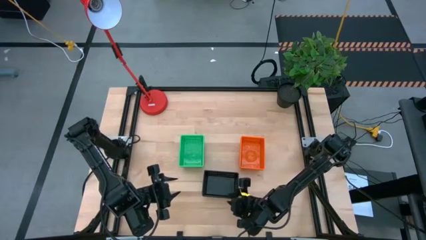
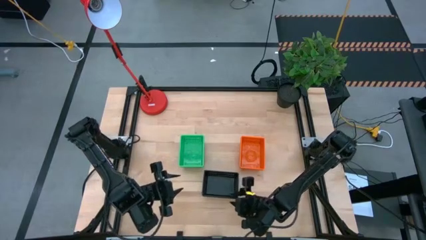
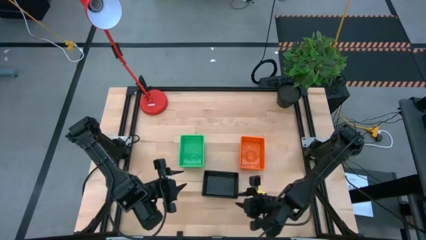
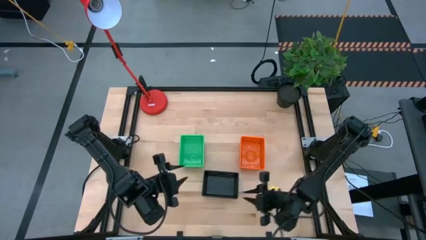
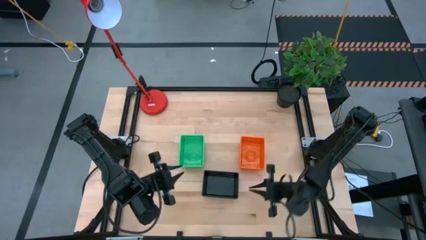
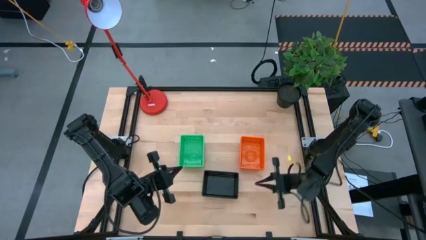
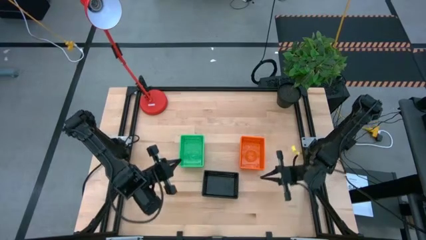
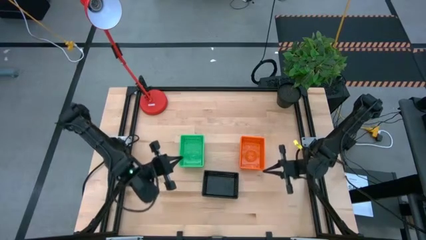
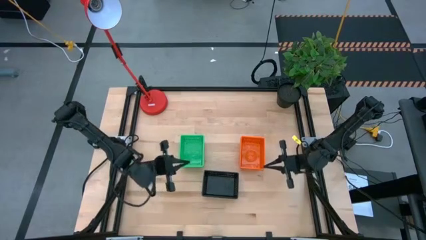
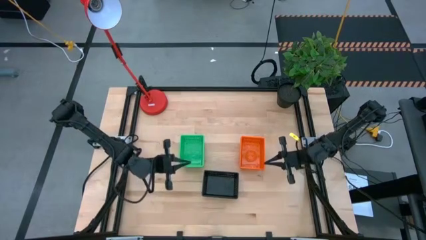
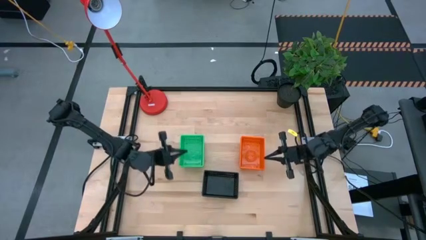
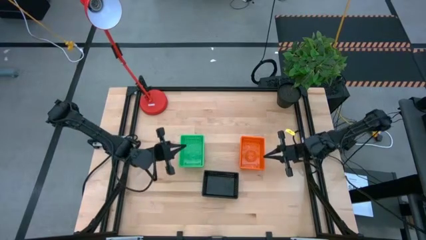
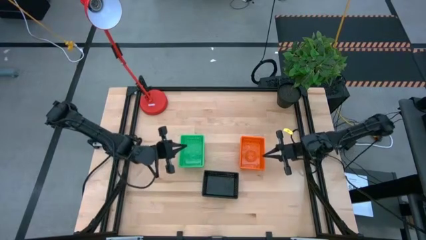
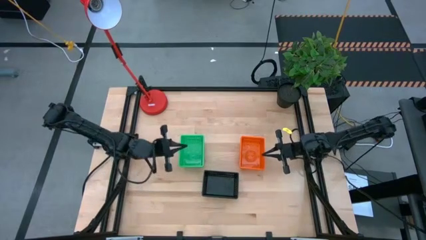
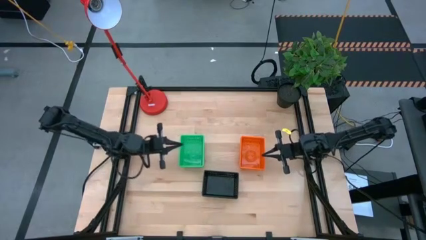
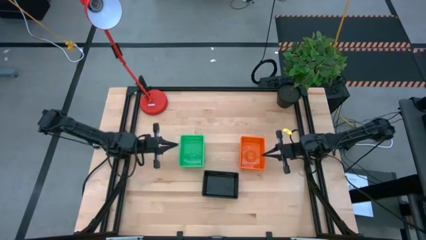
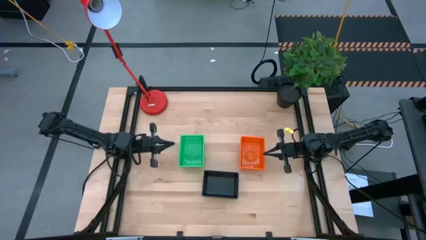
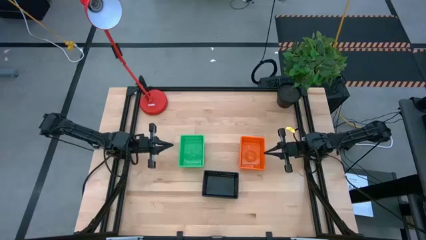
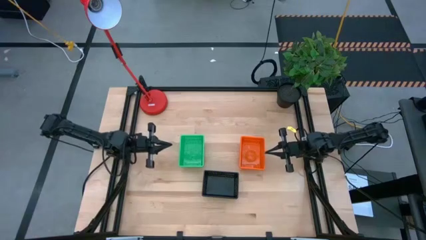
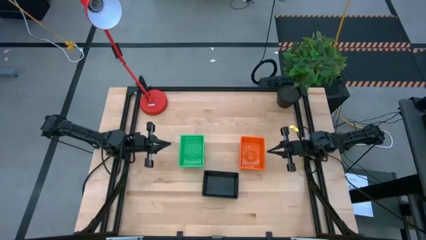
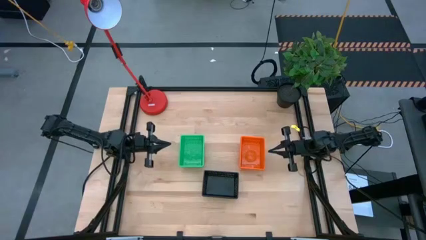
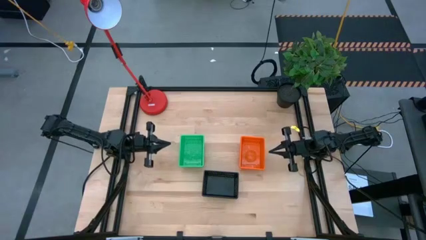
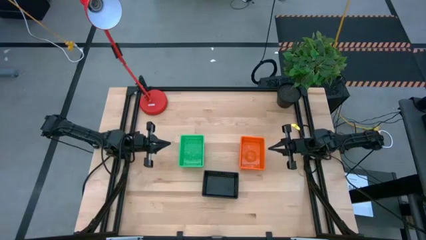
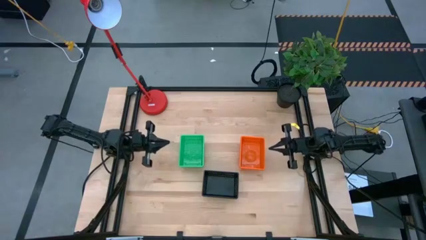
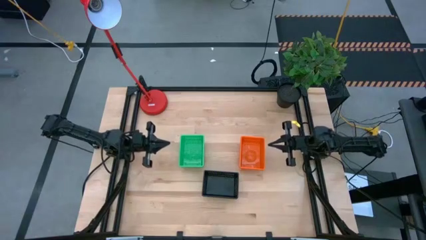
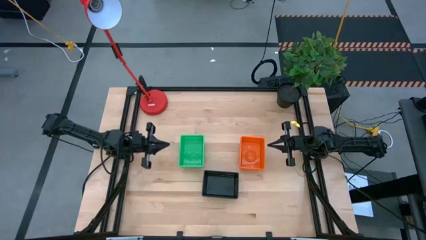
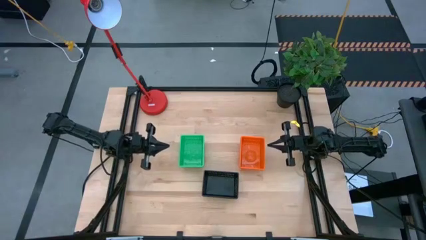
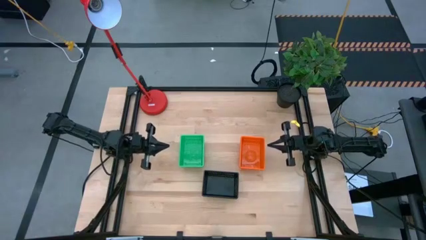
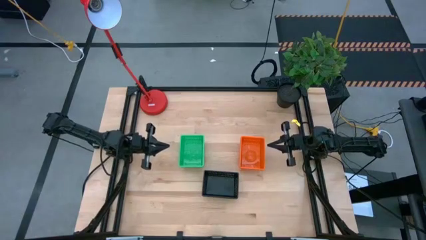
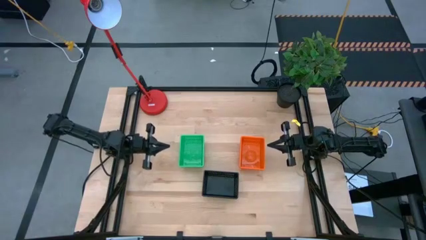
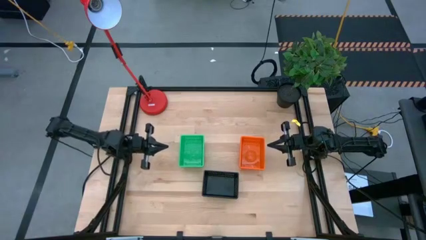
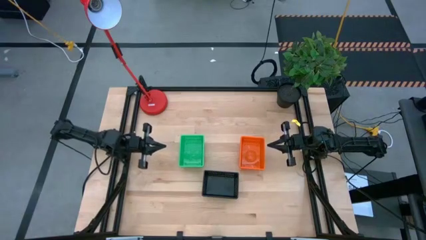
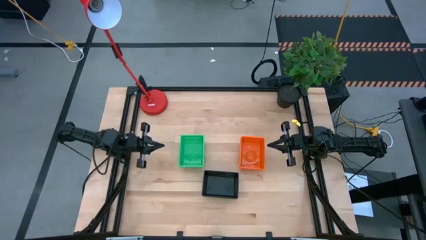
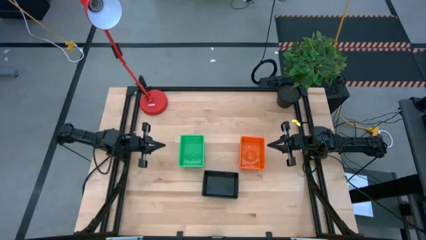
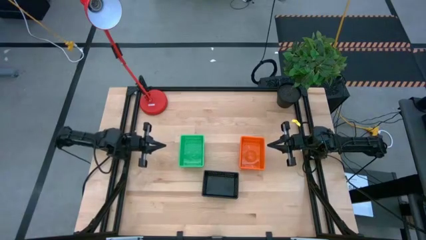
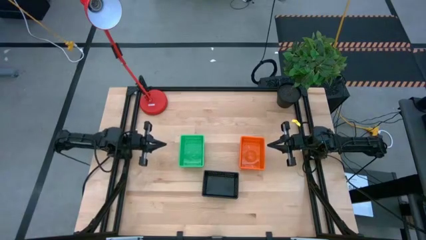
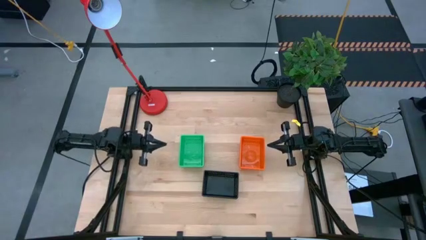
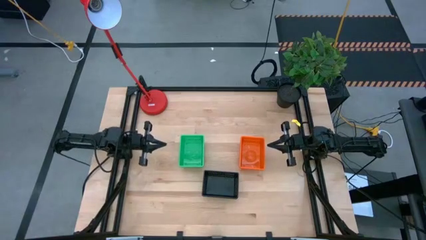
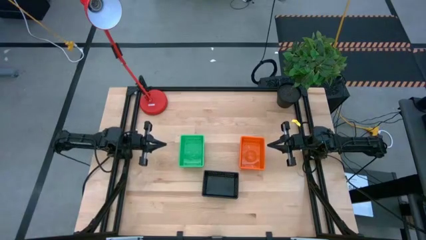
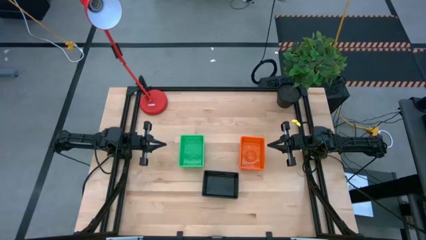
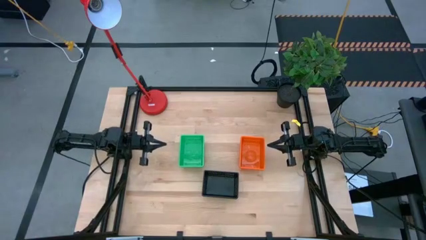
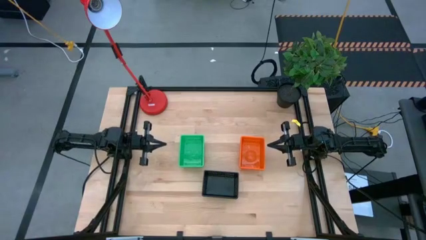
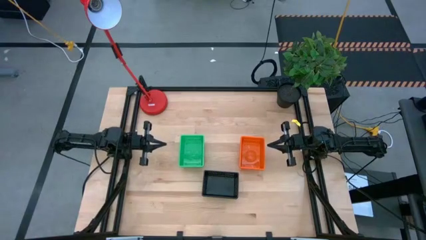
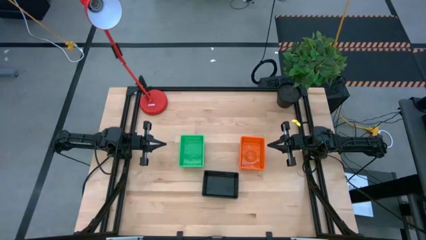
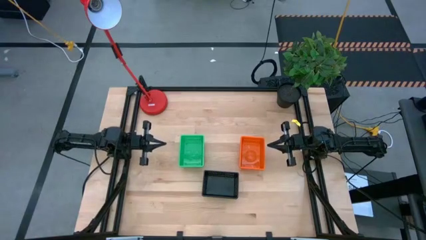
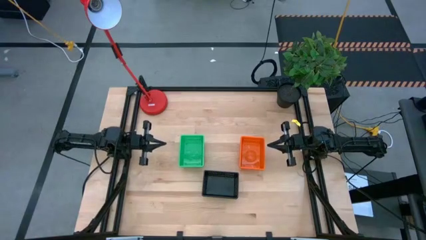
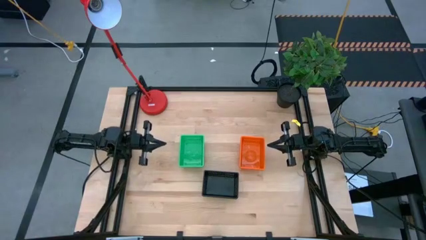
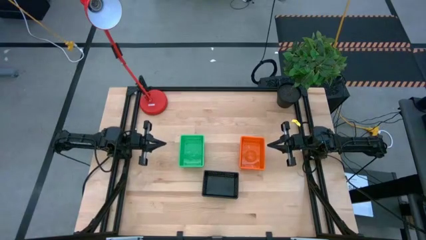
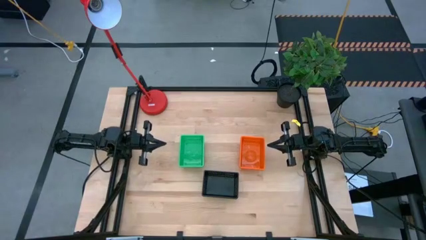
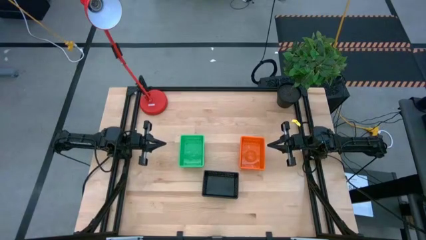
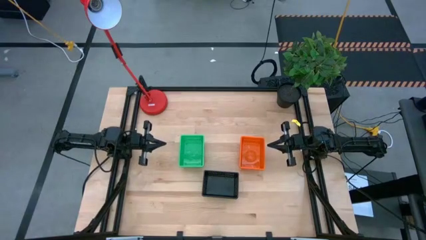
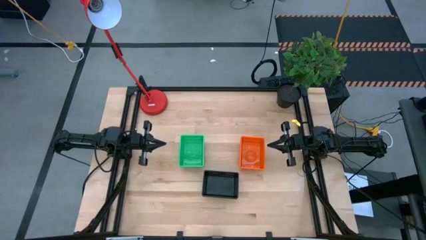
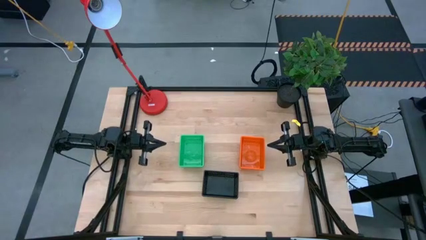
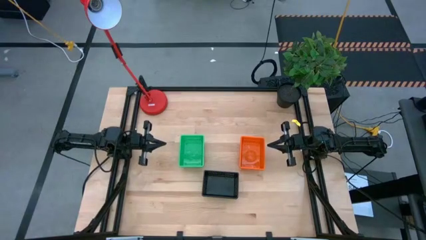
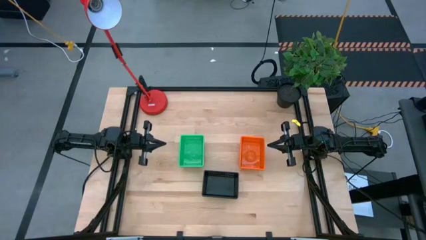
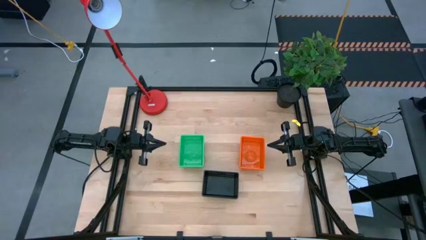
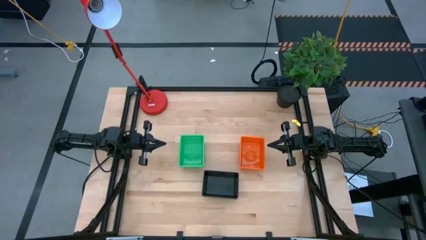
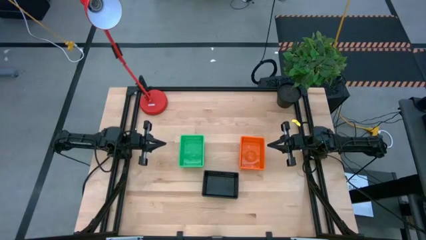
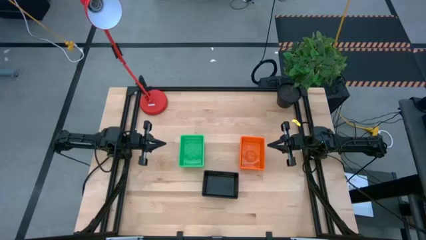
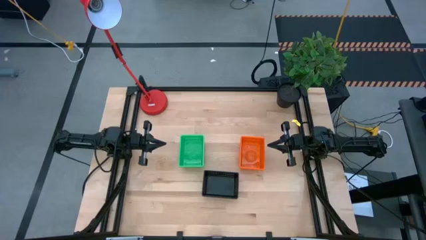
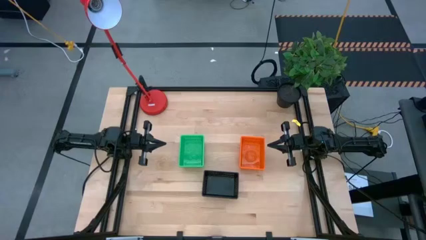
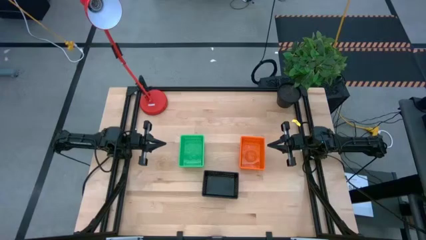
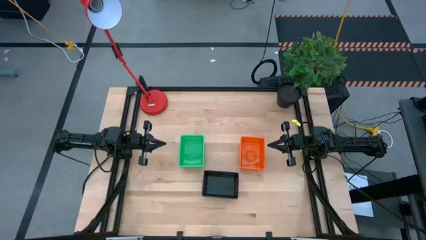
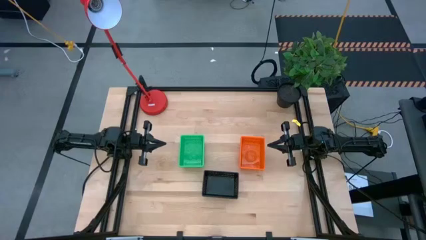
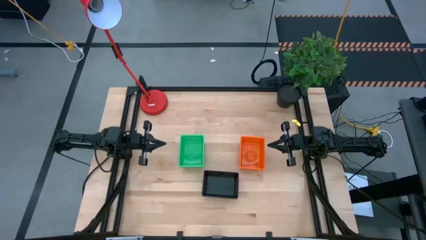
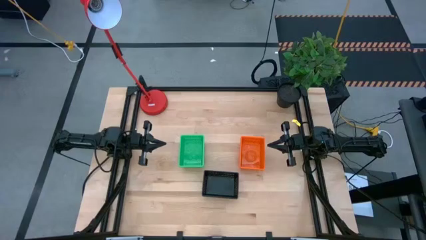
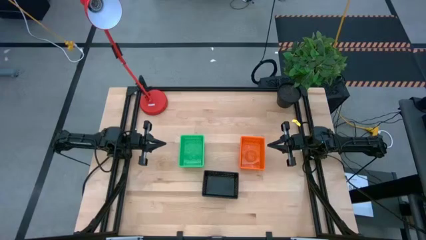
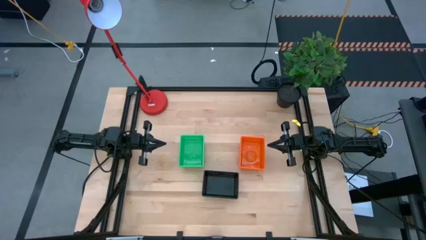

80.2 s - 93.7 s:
Return to Home Position
